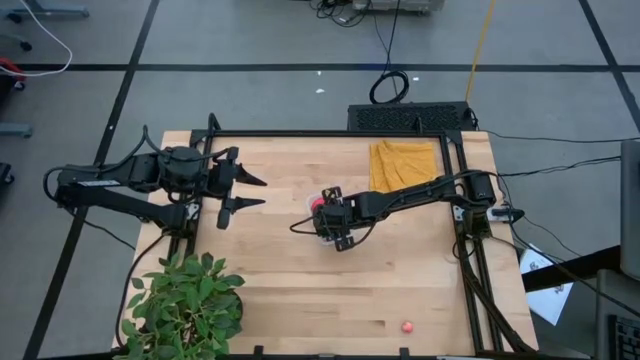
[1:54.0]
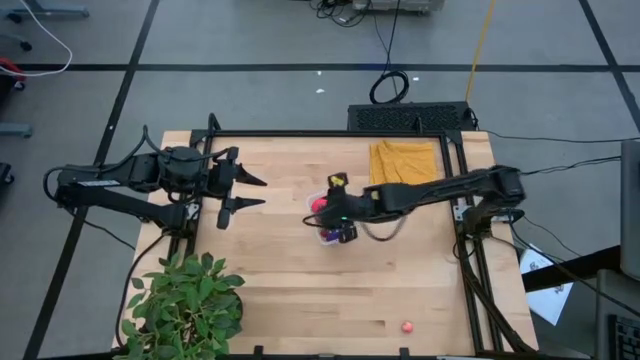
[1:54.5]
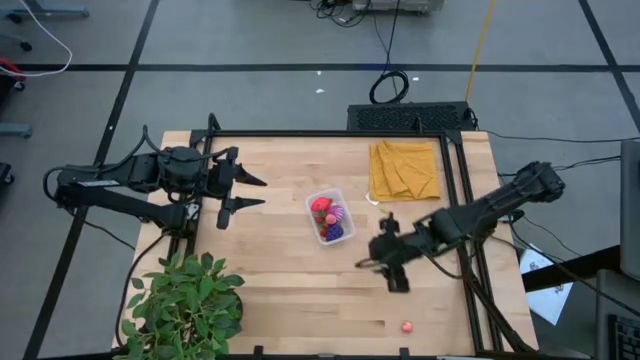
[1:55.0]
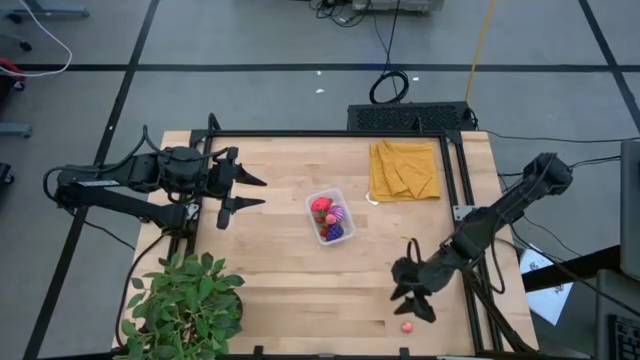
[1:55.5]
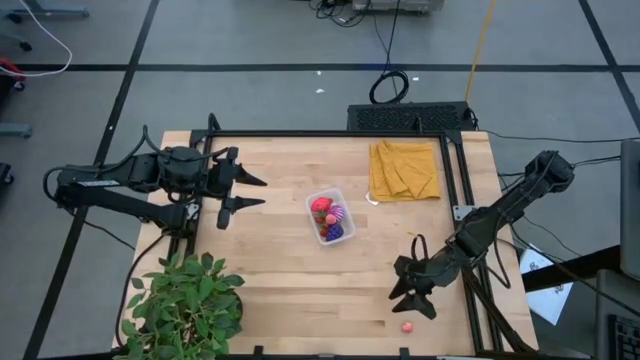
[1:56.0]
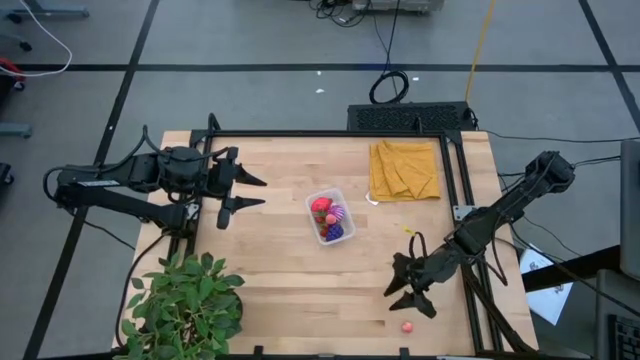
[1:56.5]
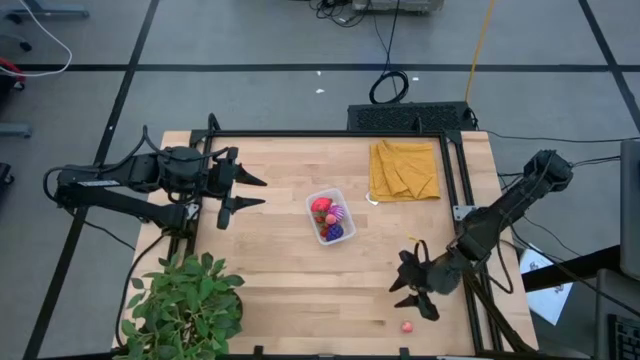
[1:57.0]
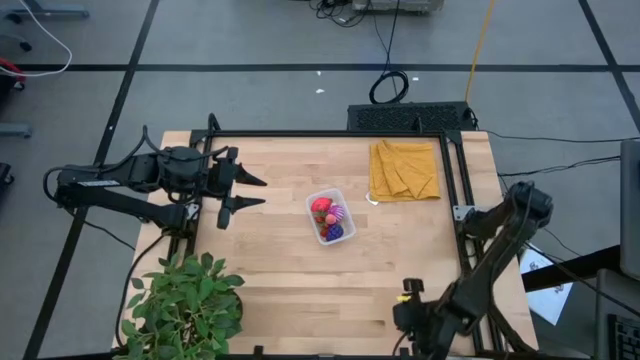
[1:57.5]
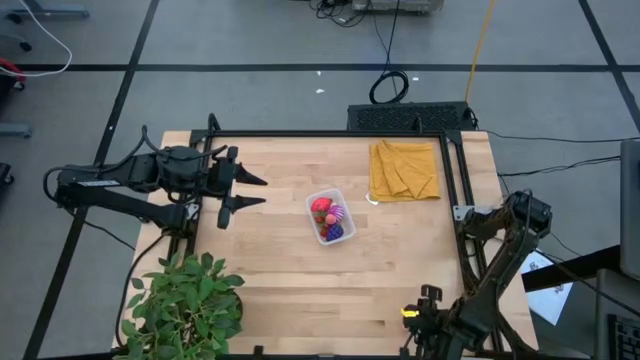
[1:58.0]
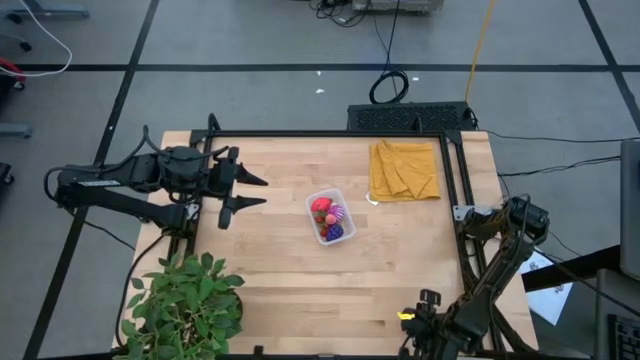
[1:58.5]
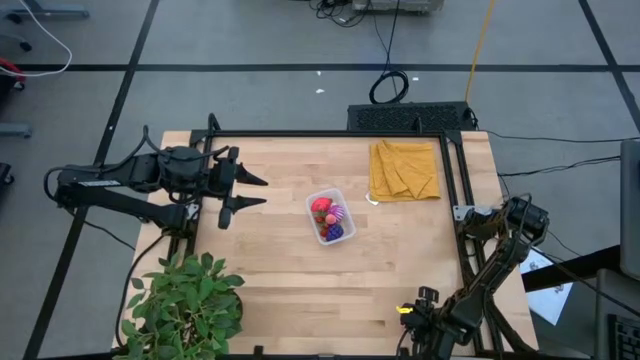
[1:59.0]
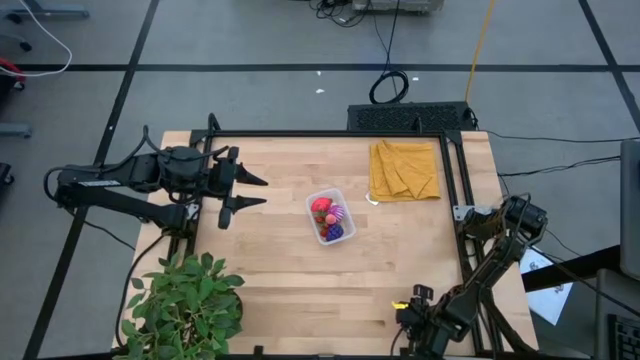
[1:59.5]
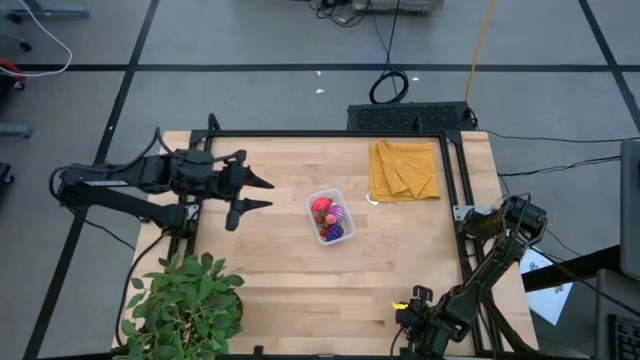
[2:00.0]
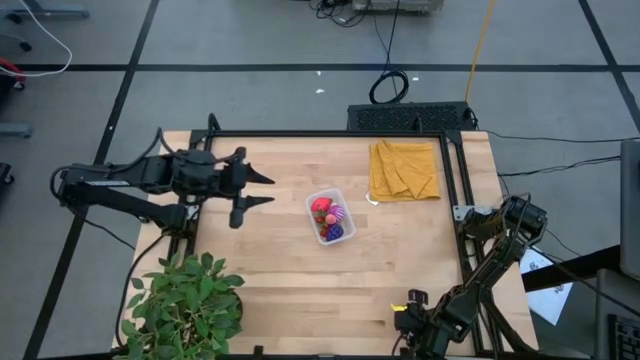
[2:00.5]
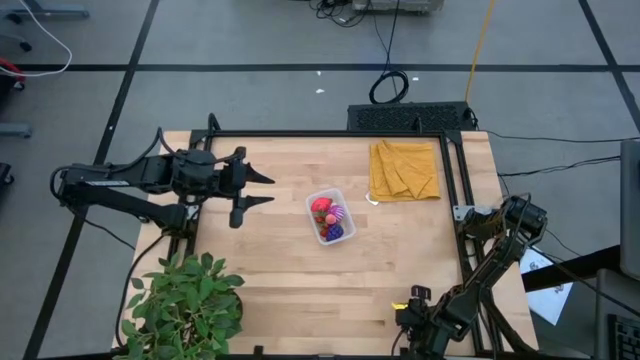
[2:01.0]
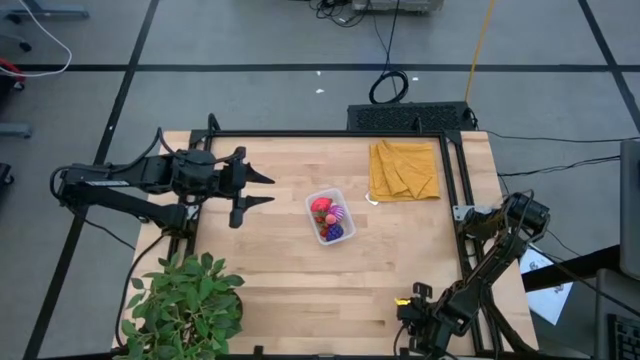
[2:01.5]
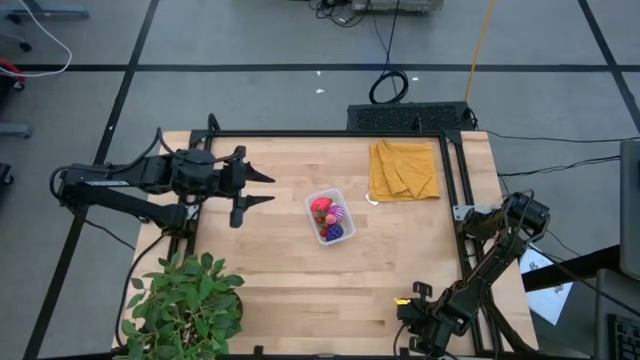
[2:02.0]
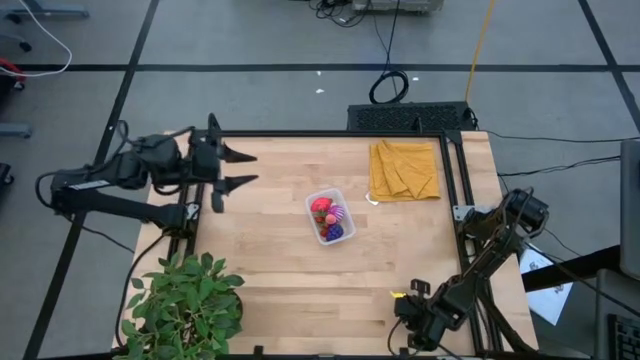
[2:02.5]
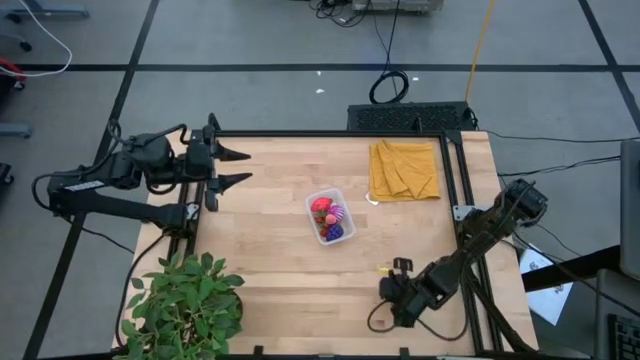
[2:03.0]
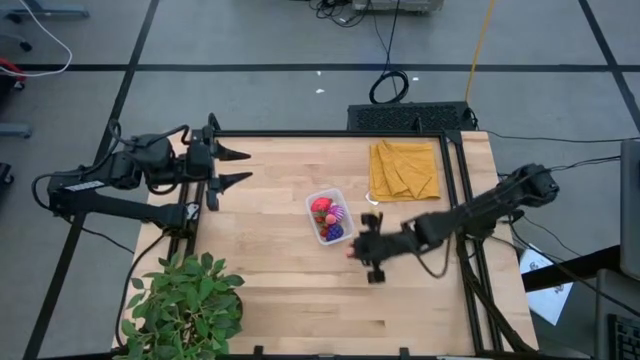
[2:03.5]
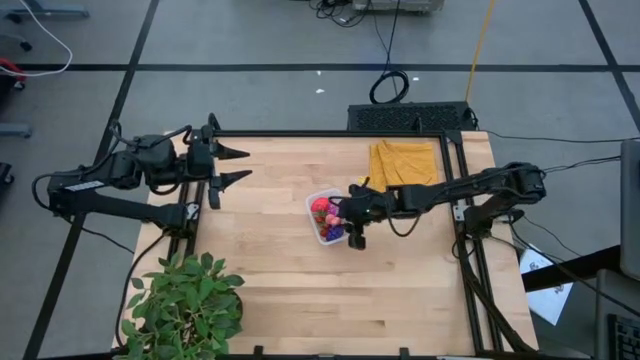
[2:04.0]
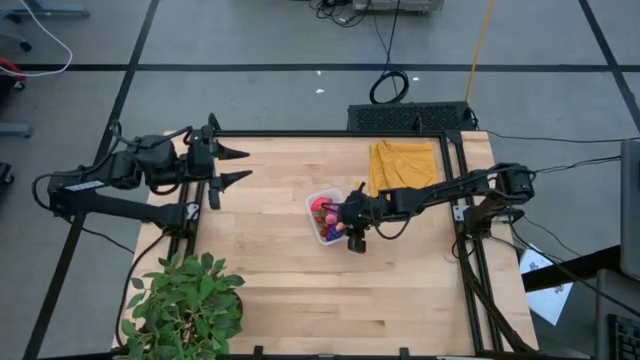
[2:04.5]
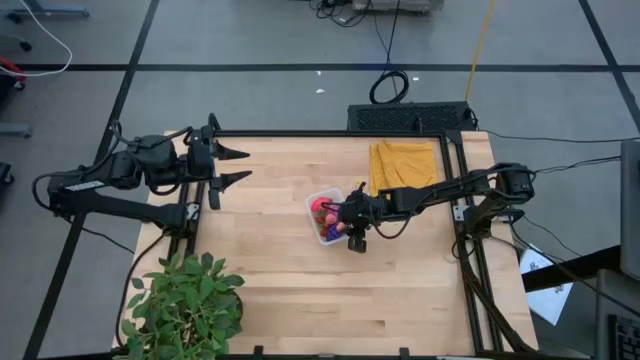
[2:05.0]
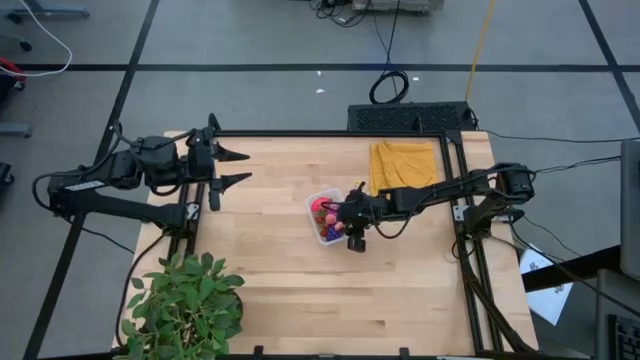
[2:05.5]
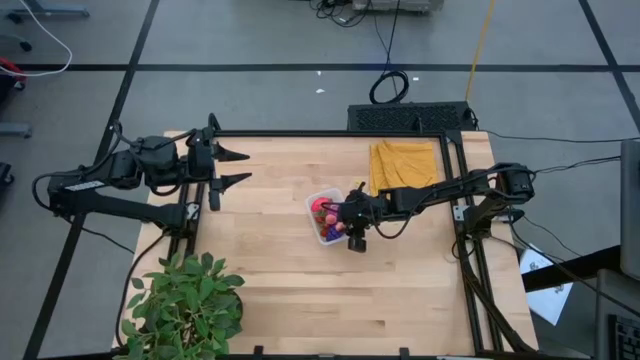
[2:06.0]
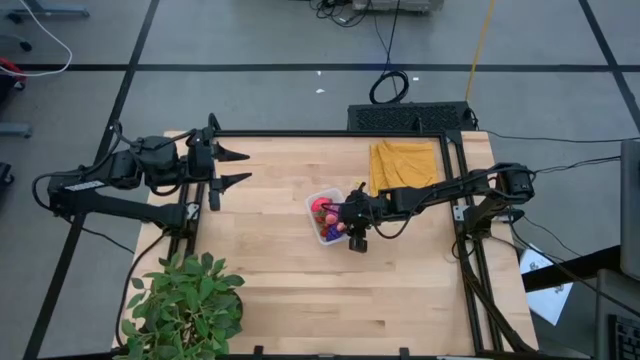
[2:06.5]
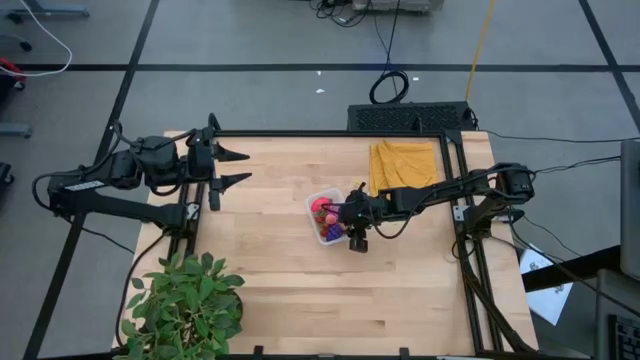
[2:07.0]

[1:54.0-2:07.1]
Task: Pick and placing Produce into tupperware
Put the pink peach into the transparent container

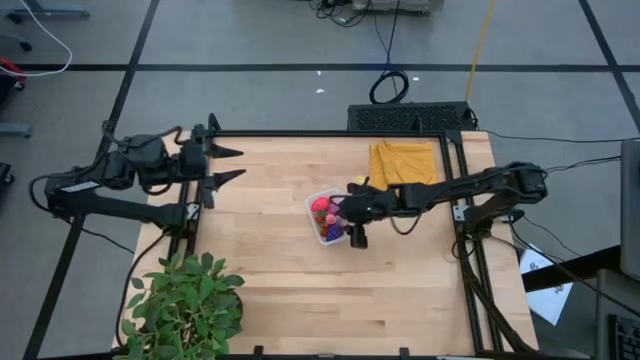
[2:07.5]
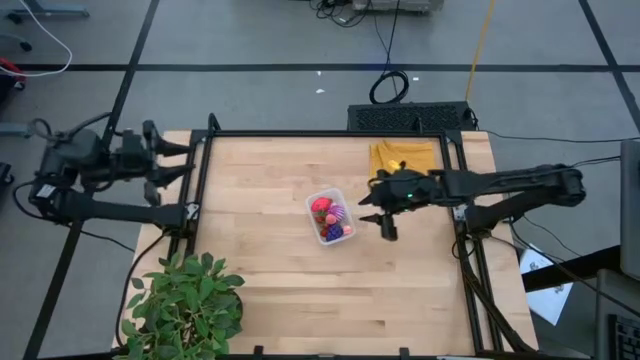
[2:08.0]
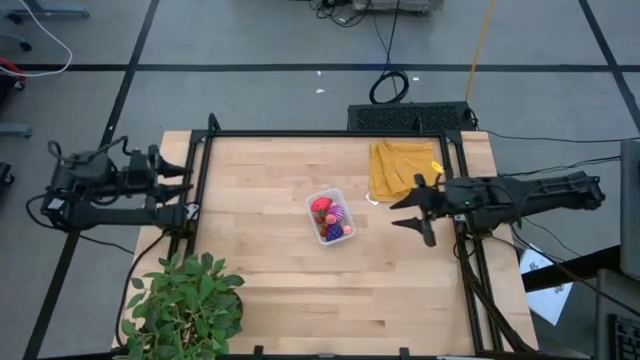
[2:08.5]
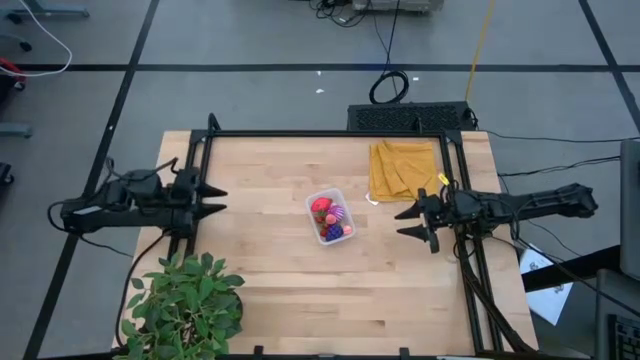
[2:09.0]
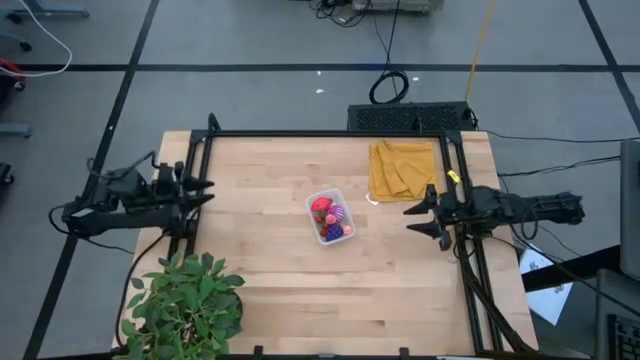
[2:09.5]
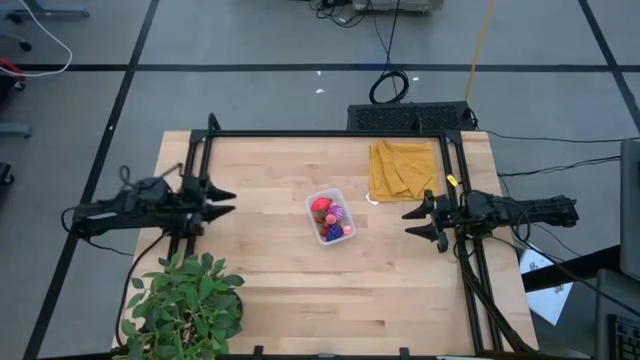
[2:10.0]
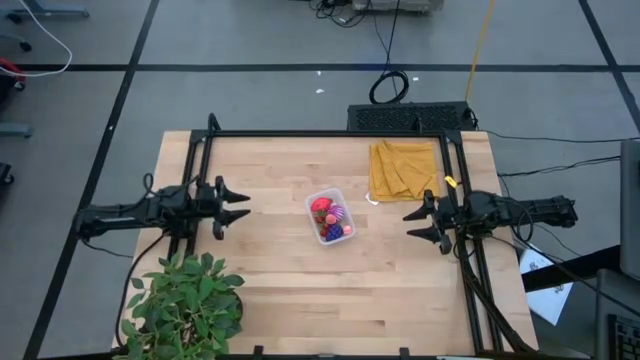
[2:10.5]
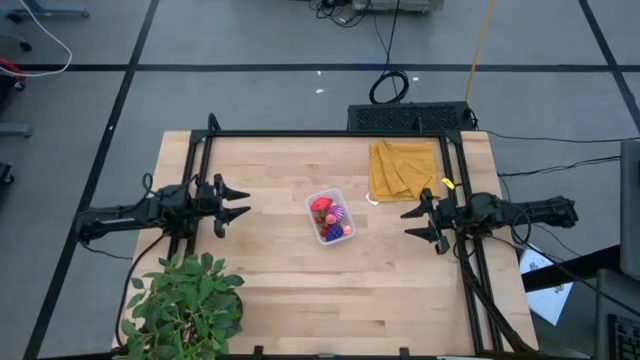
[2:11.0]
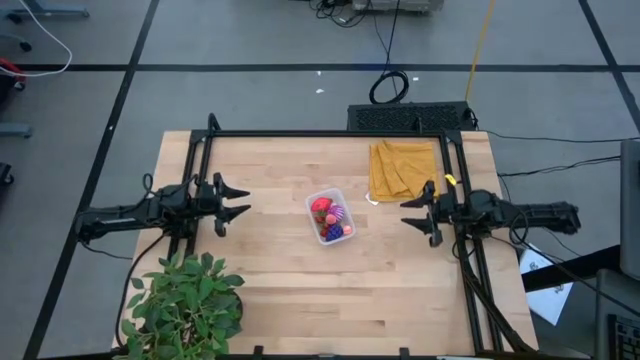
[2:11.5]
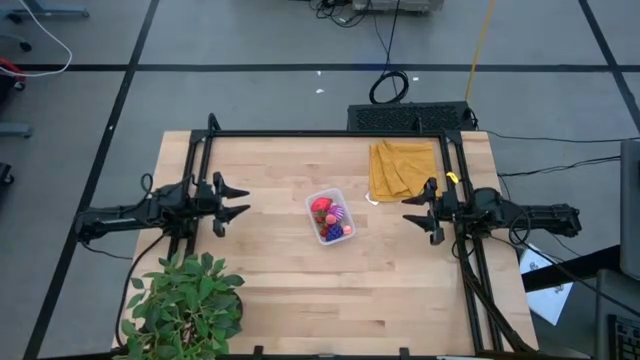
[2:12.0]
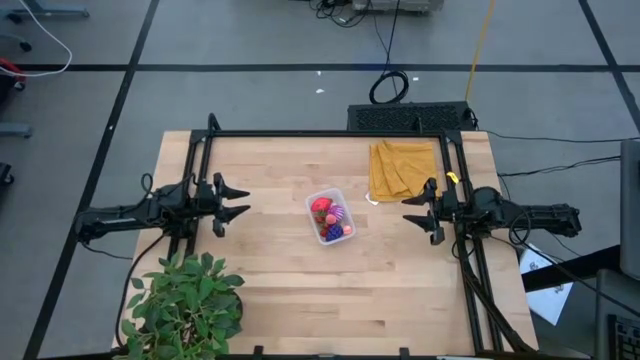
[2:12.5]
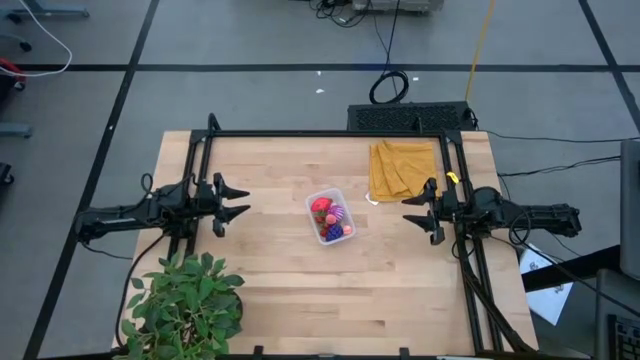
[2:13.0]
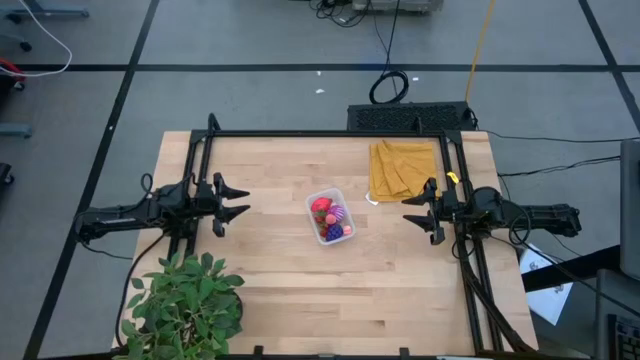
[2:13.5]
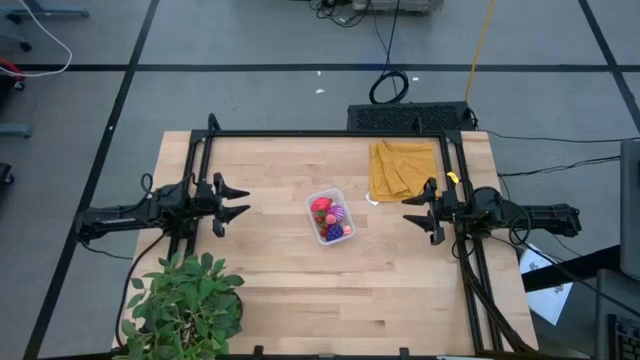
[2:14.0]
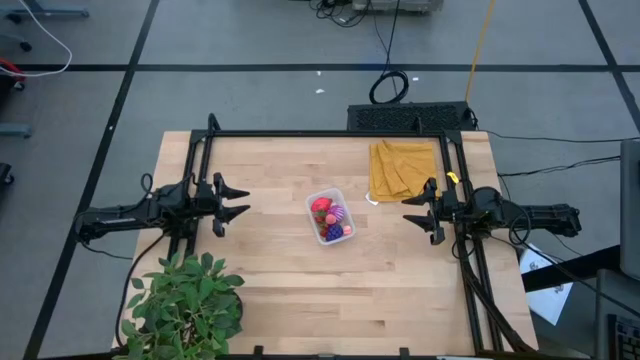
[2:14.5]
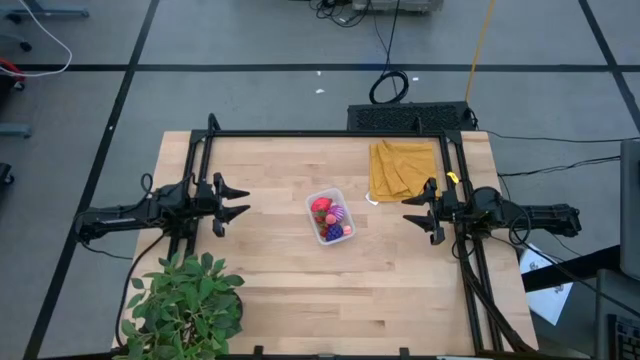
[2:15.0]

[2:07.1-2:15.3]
Return to Home Position

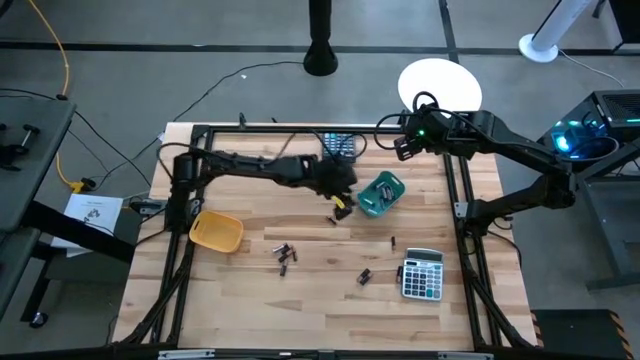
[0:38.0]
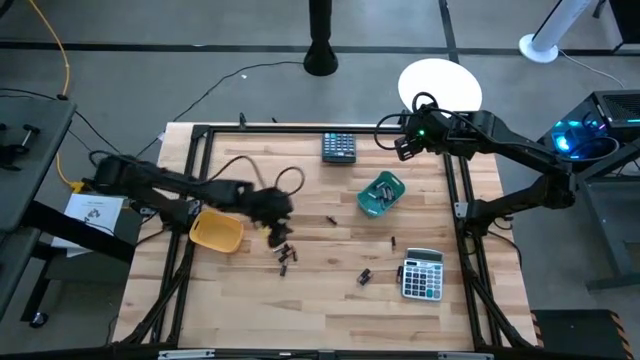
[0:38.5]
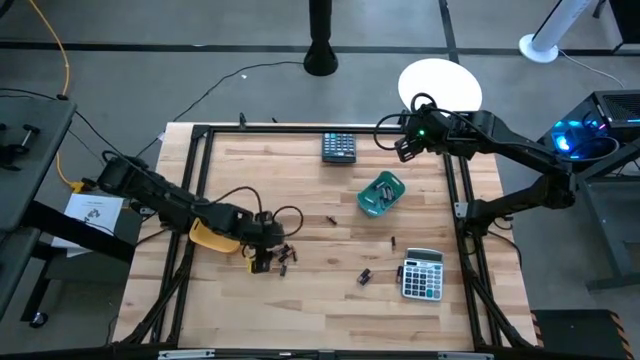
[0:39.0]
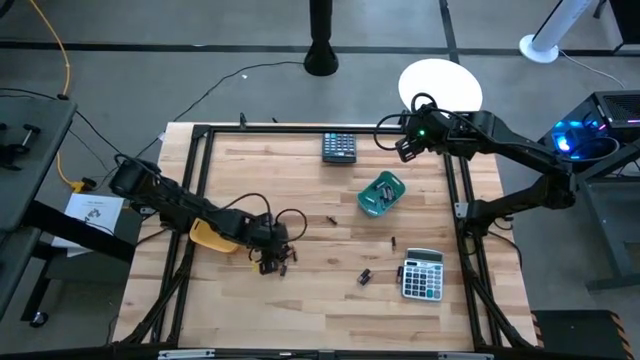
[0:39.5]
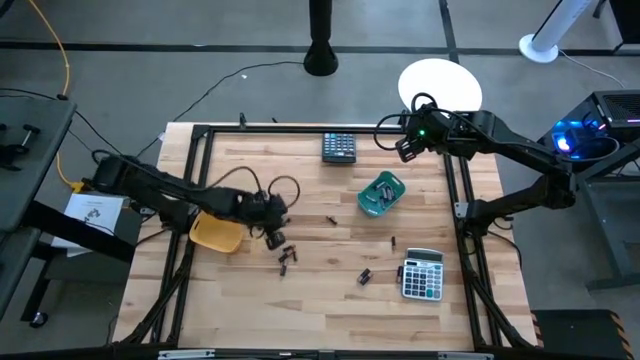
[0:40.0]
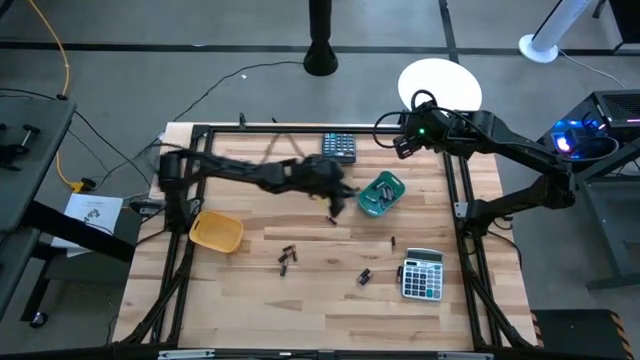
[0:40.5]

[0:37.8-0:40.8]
Task: Sort batteries
Put the silver battery into the green bin
